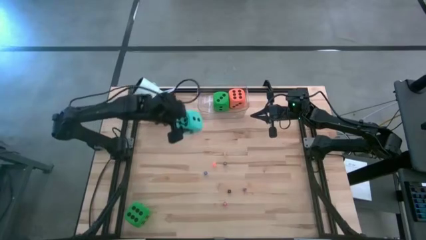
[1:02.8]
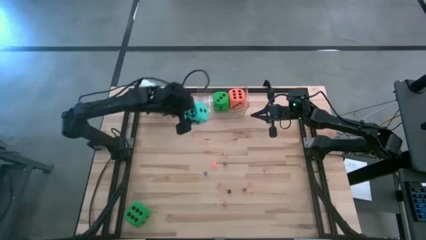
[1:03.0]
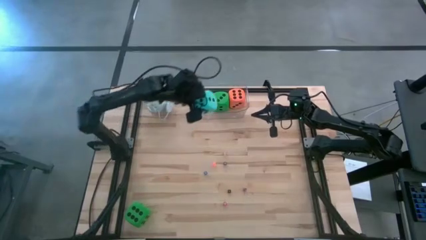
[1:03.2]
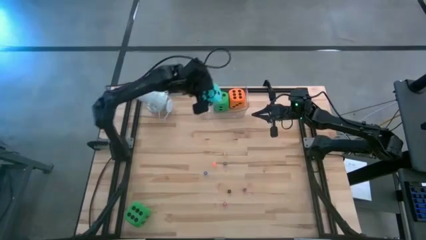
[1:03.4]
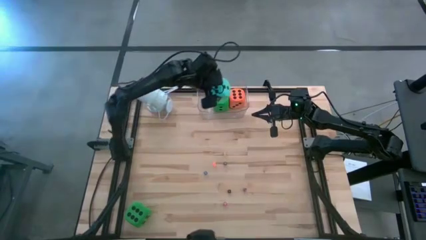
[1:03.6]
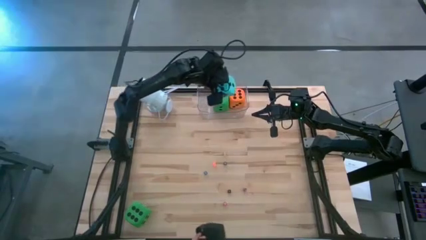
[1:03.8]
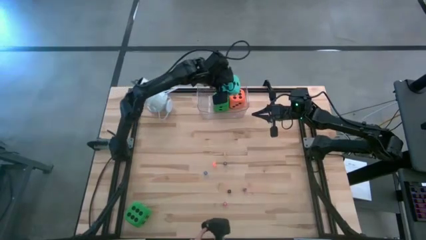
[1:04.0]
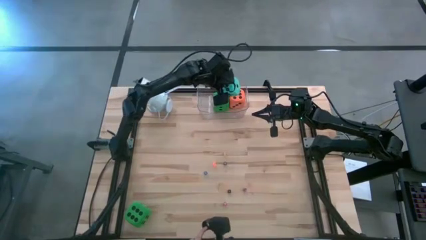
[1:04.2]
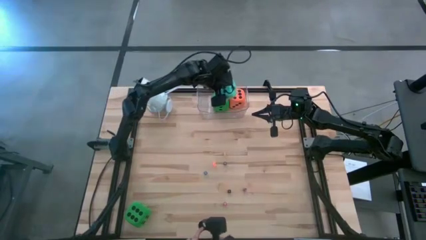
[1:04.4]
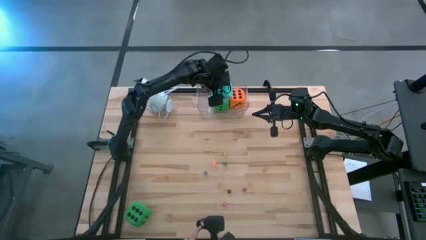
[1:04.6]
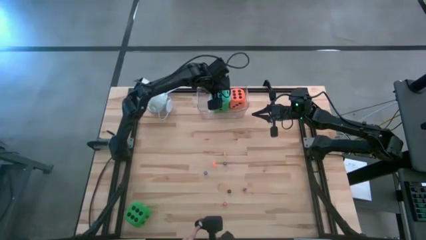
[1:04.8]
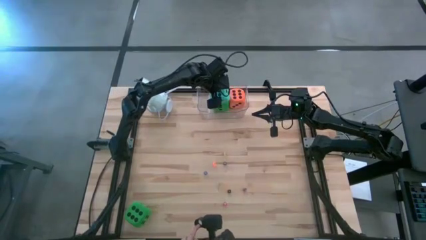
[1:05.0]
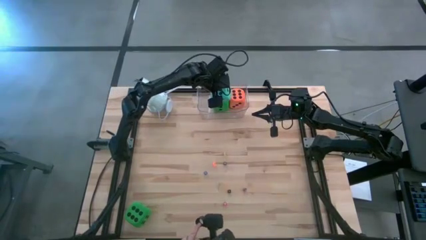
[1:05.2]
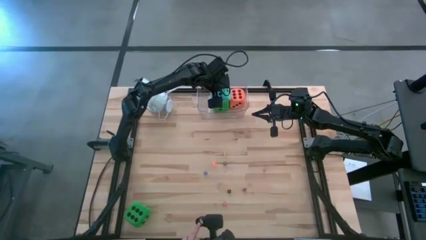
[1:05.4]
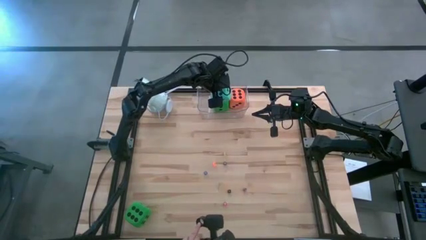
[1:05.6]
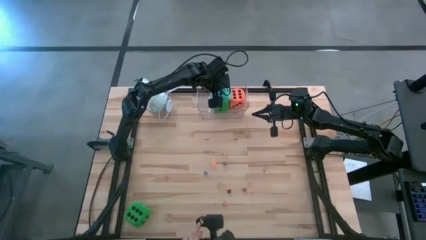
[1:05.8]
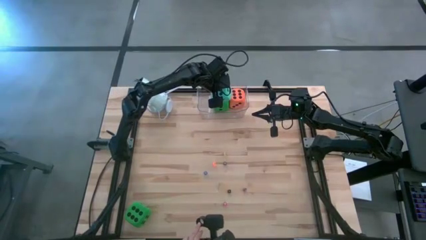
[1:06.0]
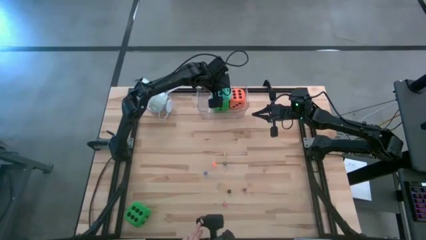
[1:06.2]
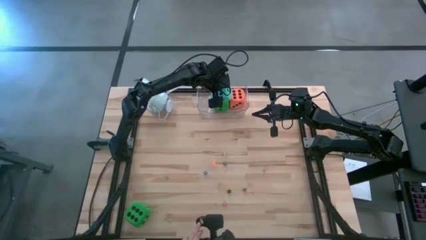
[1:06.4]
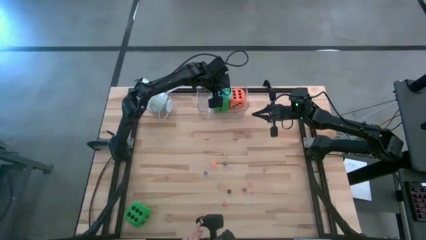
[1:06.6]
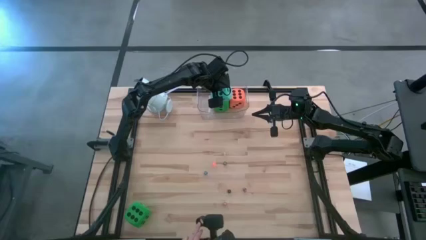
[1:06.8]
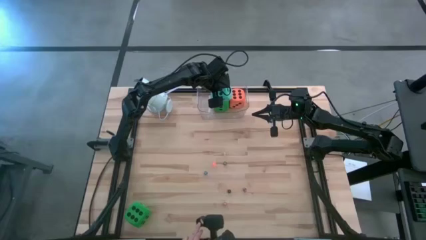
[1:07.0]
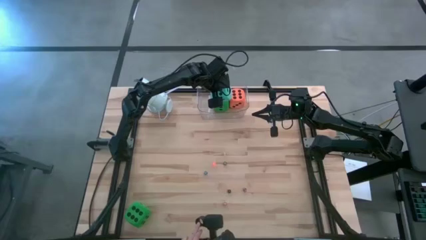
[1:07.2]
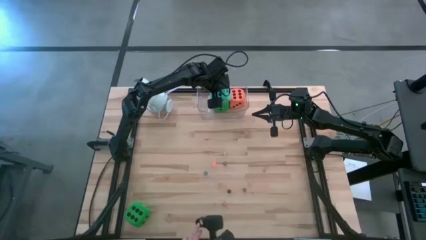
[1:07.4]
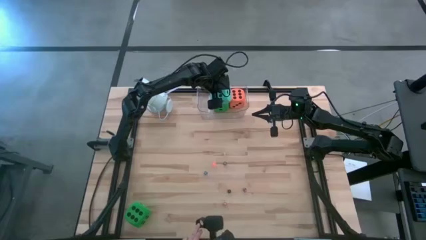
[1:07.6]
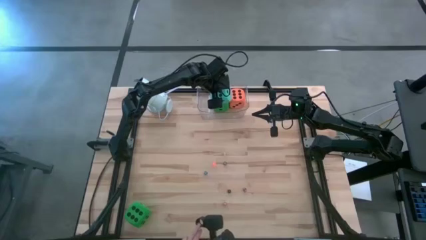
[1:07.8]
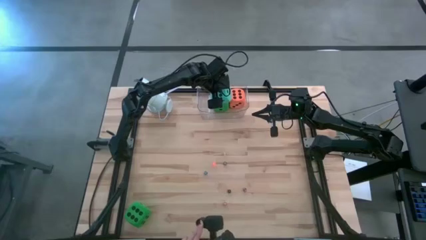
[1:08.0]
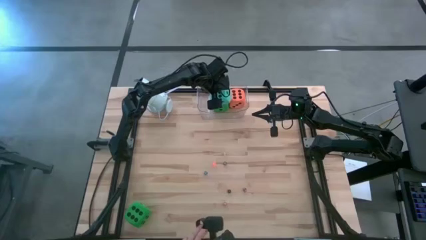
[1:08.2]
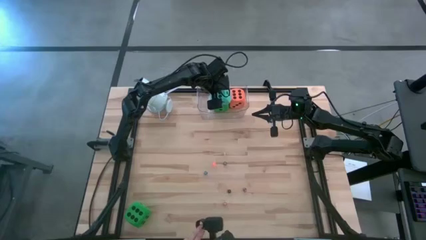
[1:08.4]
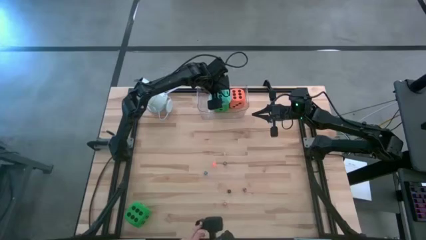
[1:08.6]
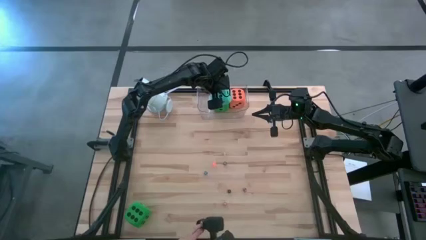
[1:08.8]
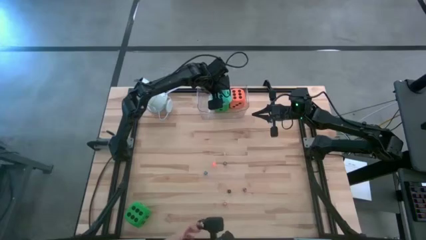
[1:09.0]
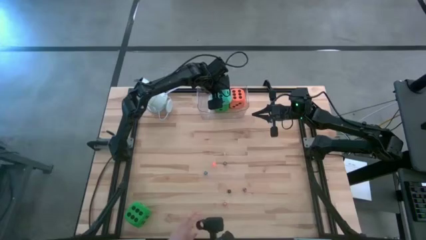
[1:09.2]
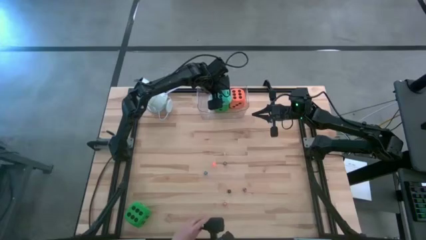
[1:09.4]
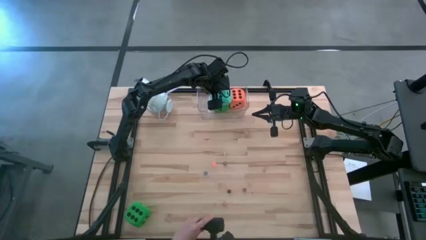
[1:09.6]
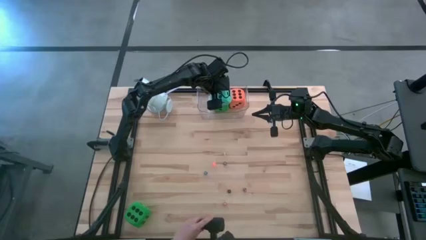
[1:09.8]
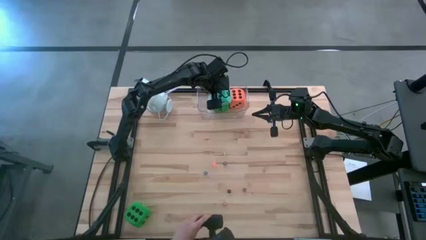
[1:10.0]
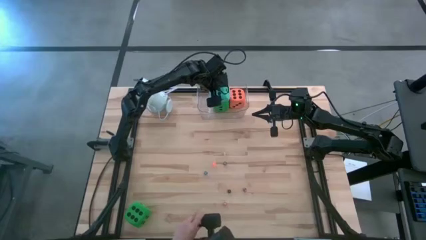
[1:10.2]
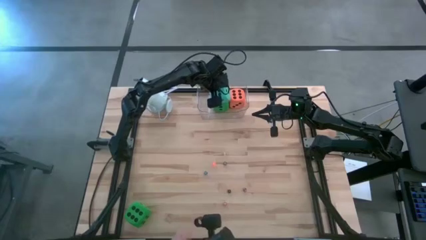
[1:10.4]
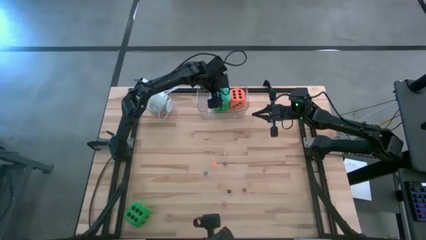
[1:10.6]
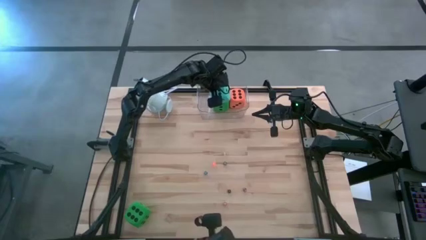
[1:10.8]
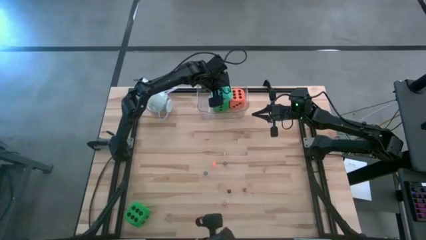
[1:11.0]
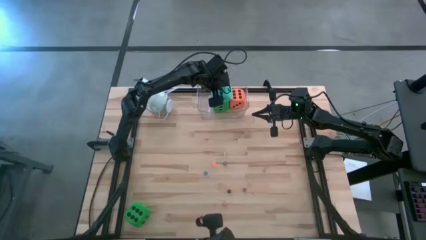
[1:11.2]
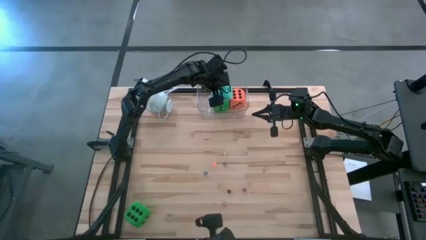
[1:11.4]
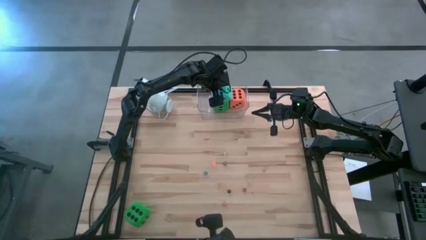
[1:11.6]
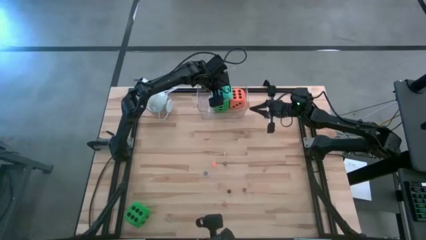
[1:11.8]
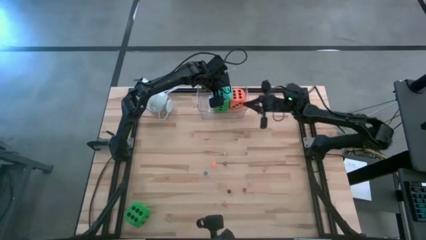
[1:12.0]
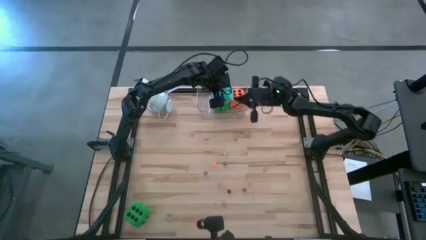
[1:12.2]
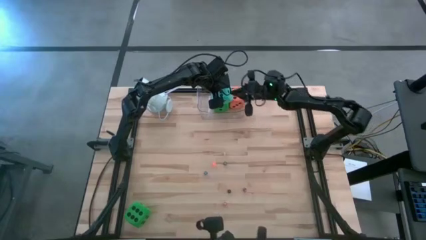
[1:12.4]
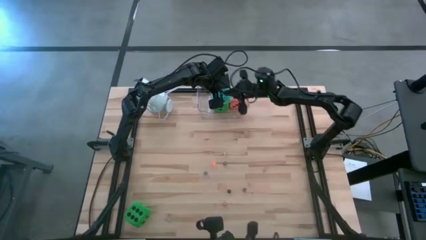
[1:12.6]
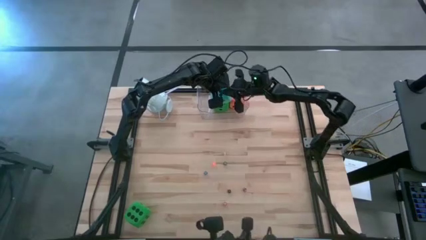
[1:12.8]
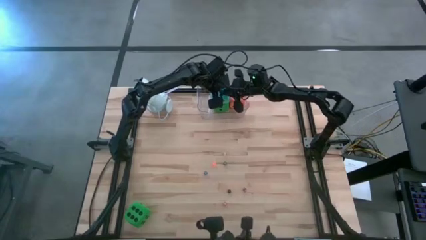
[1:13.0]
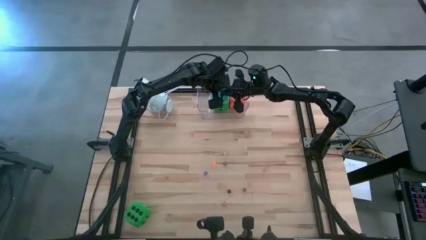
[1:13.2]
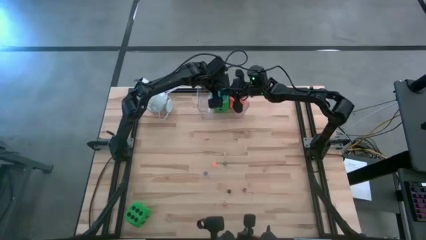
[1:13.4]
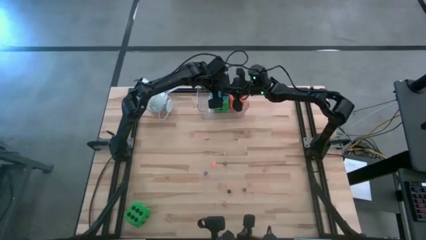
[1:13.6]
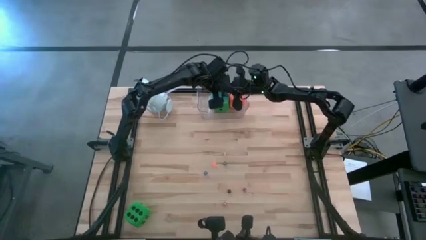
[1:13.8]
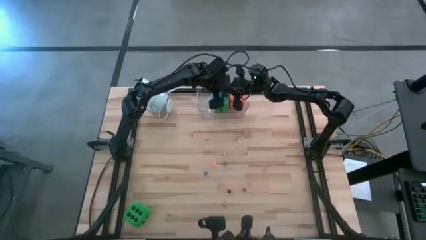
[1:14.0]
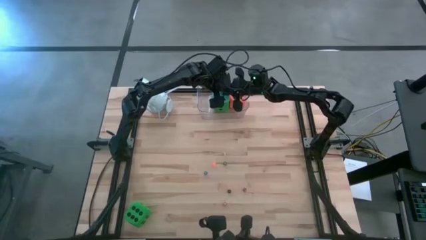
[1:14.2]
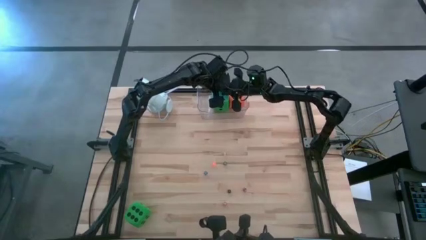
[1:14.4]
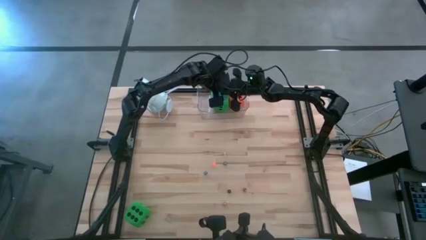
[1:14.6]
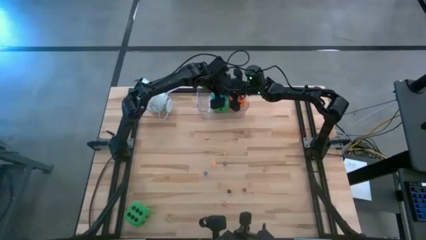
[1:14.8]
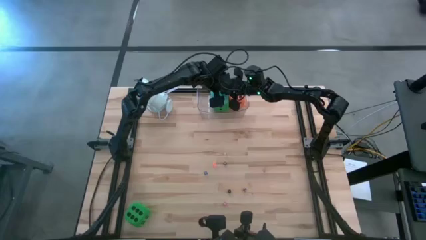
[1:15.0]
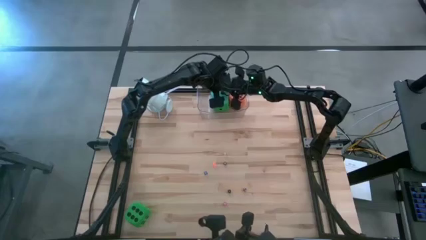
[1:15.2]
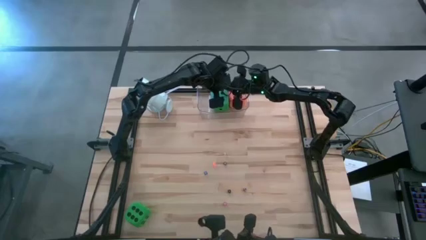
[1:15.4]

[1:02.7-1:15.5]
Task: Pick & Place Dice
Put the big blue dice into the transparent bin

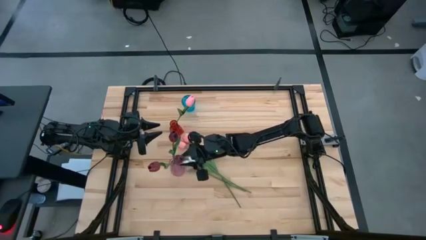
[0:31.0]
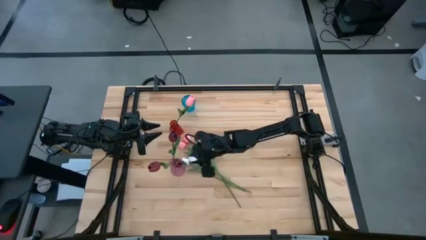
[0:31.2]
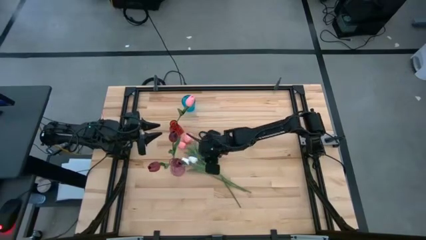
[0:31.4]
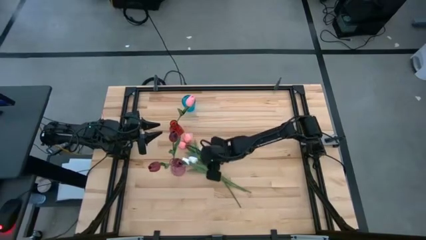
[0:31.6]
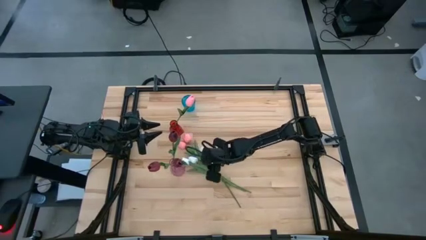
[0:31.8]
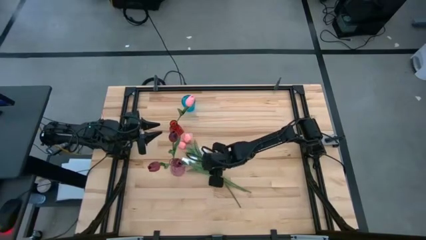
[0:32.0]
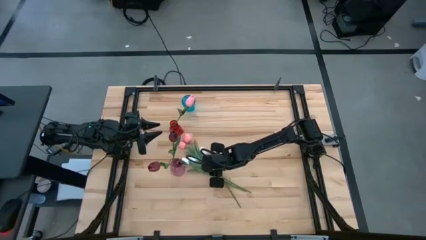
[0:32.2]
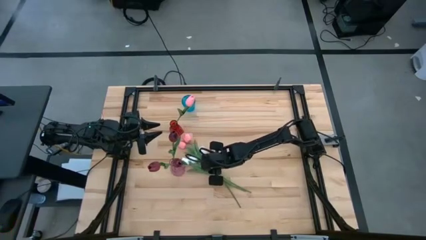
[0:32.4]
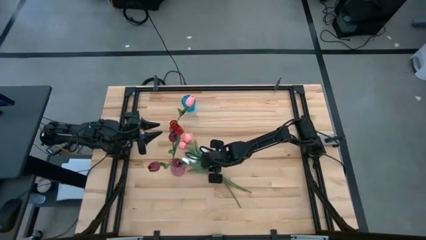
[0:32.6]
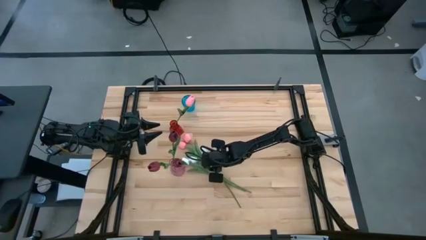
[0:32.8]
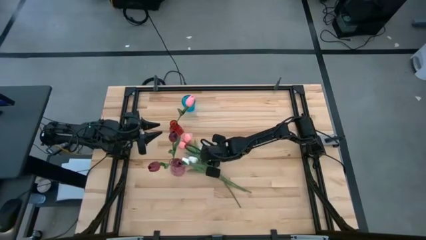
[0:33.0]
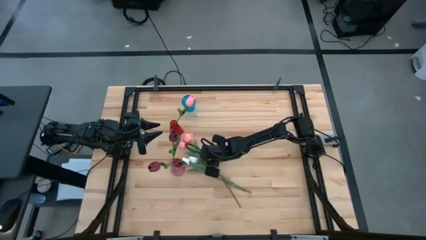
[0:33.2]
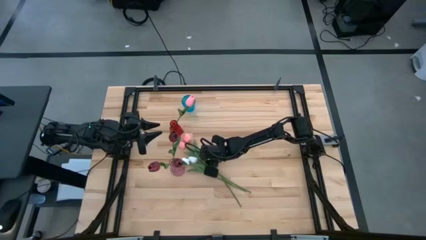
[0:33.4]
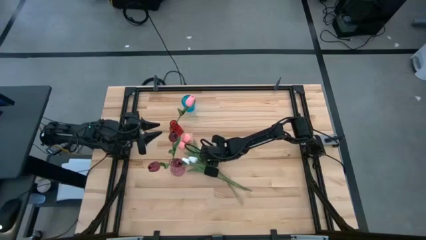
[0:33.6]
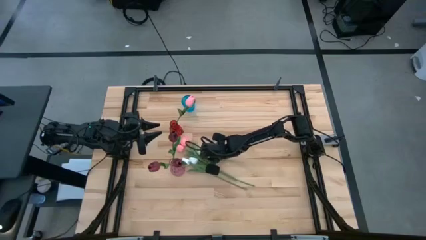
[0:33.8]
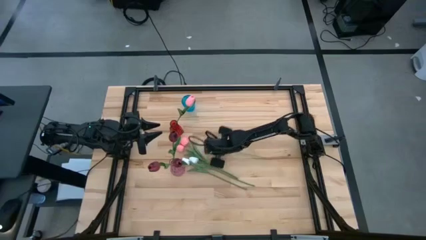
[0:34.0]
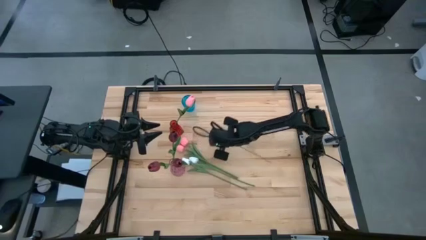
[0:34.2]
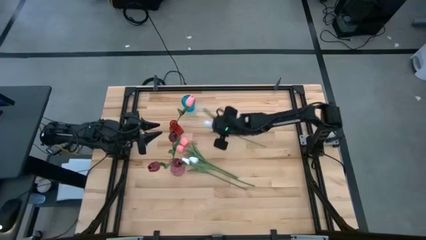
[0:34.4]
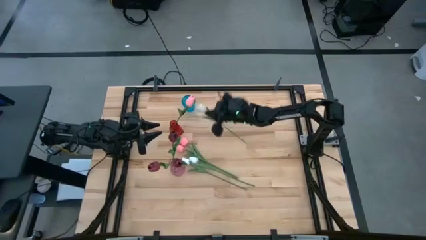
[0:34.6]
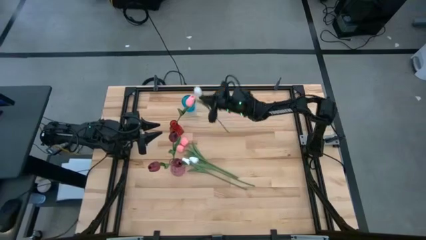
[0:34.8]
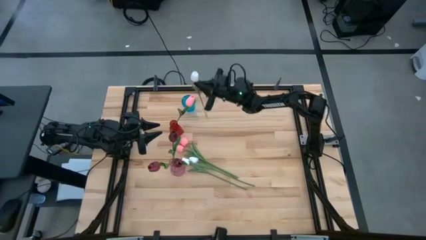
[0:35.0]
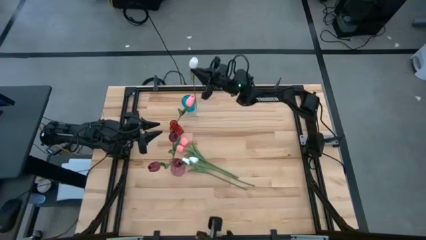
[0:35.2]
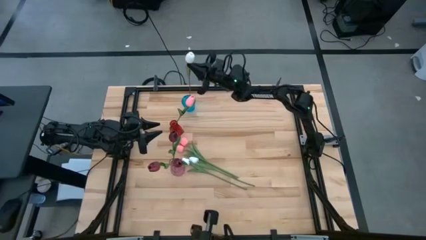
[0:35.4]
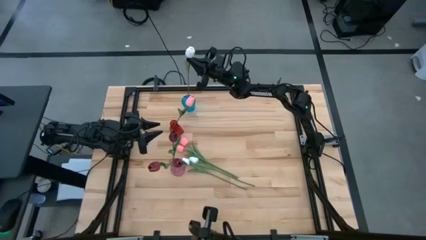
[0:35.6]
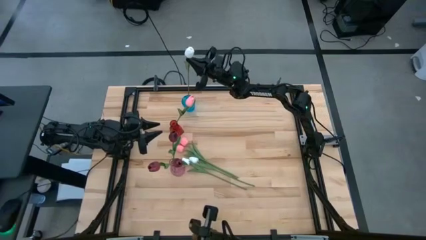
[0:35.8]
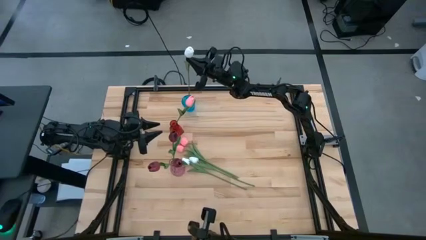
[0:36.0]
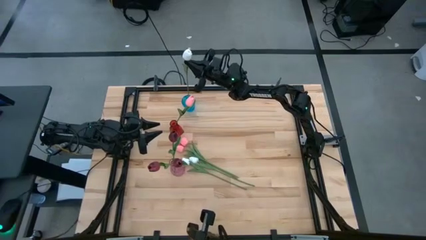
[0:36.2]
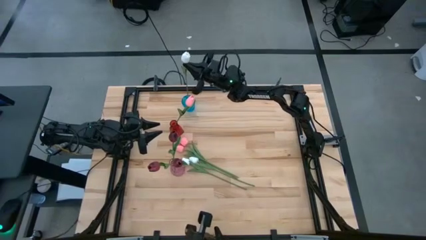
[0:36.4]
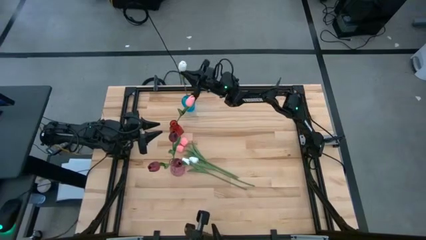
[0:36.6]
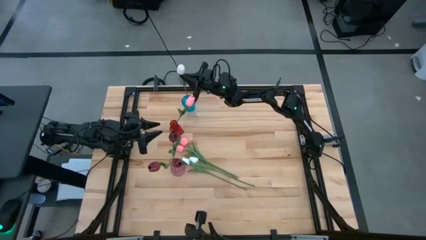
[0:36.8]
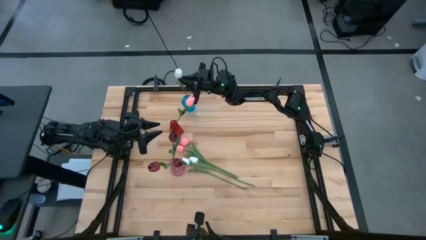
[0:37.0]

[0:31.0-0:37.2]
Task: Sort flowers into vase by color
Put the white tulip into the blue vase
